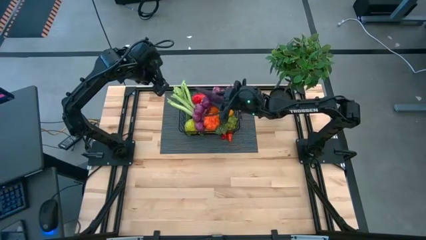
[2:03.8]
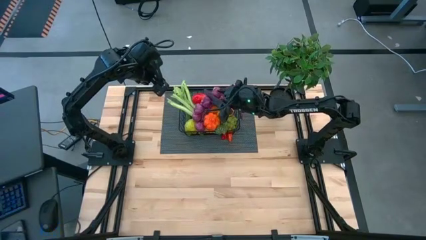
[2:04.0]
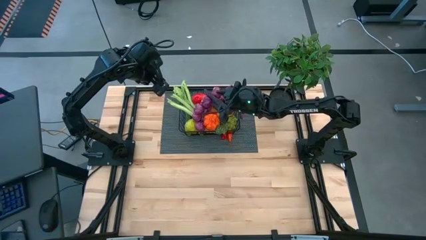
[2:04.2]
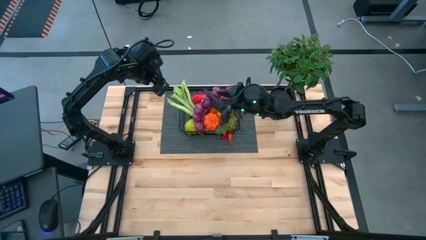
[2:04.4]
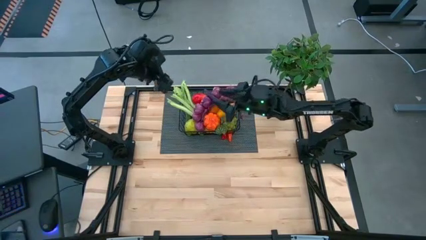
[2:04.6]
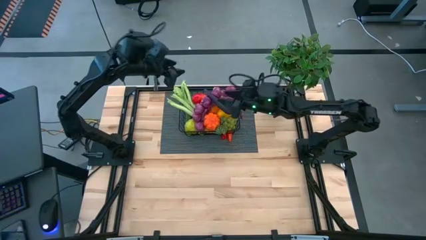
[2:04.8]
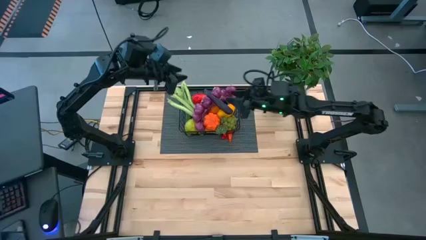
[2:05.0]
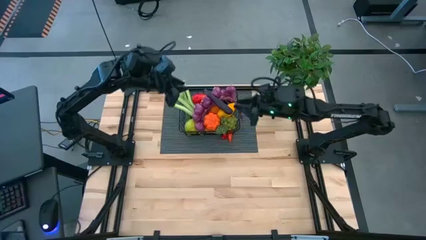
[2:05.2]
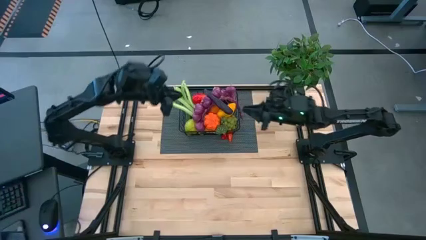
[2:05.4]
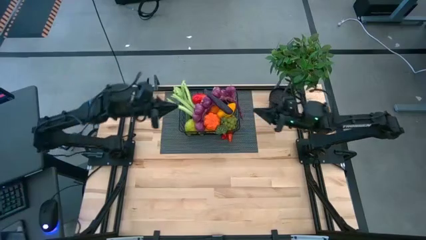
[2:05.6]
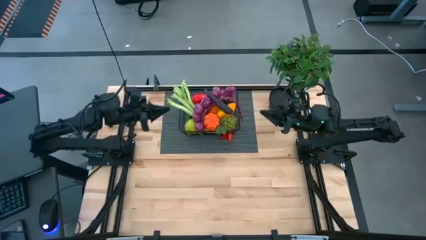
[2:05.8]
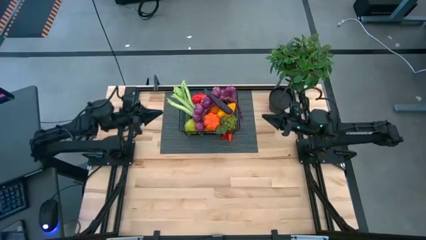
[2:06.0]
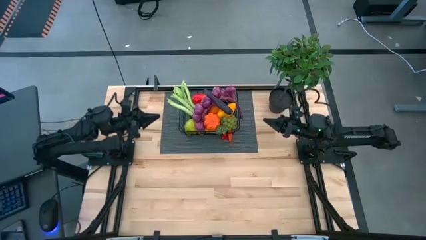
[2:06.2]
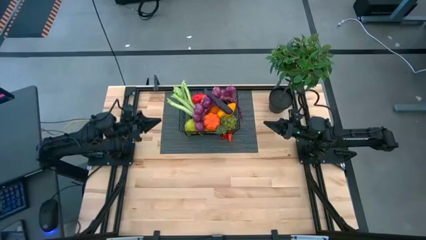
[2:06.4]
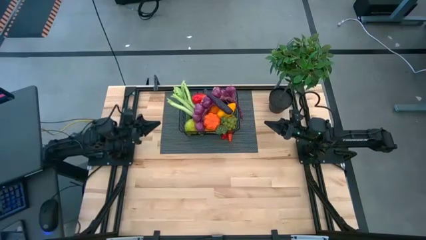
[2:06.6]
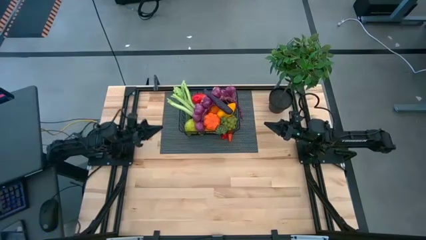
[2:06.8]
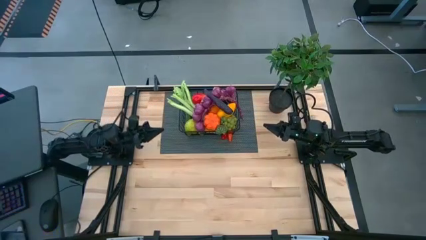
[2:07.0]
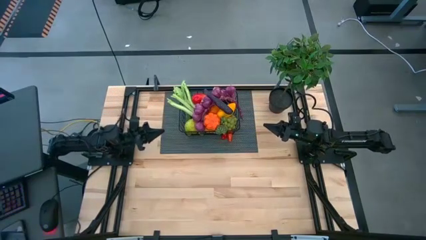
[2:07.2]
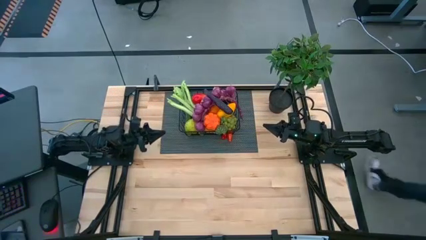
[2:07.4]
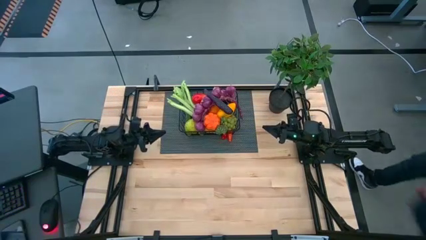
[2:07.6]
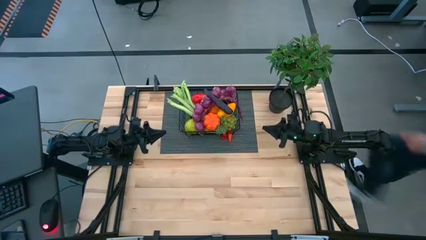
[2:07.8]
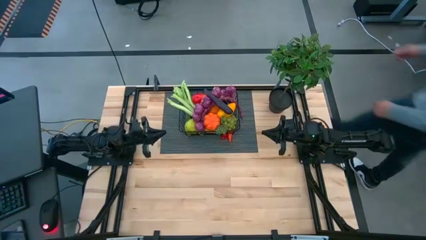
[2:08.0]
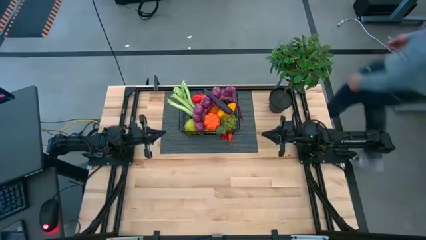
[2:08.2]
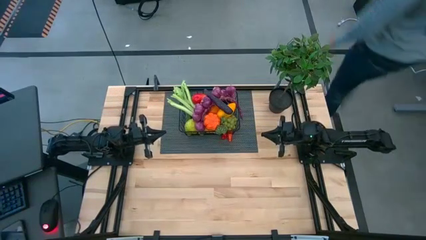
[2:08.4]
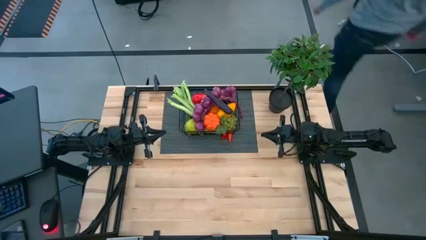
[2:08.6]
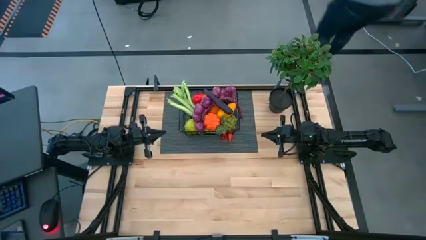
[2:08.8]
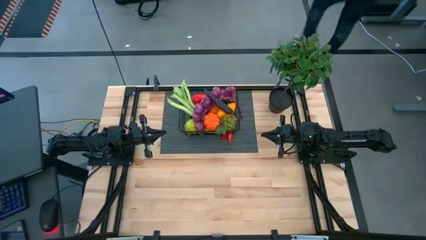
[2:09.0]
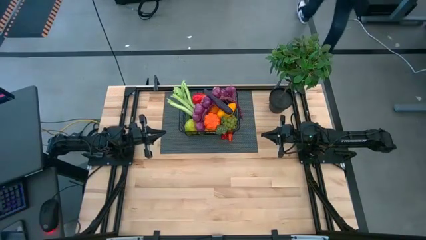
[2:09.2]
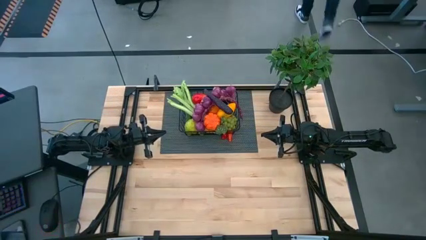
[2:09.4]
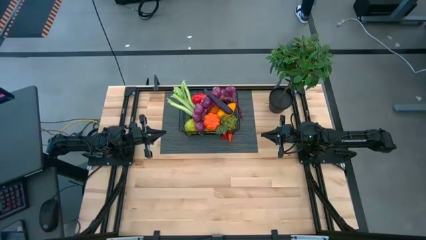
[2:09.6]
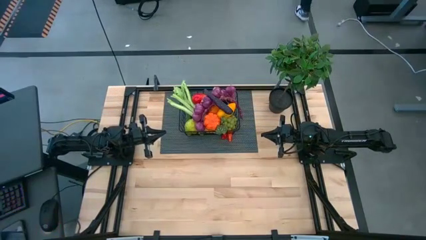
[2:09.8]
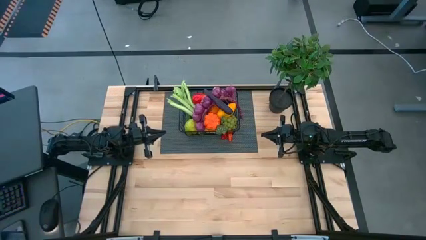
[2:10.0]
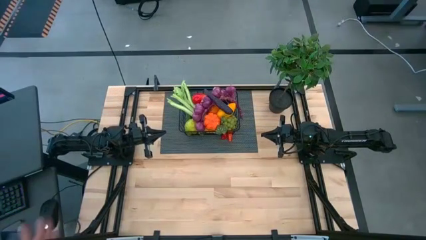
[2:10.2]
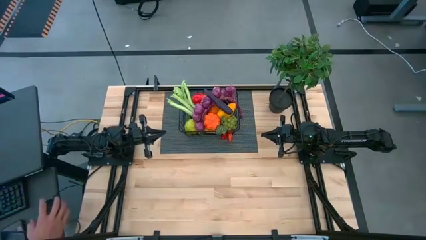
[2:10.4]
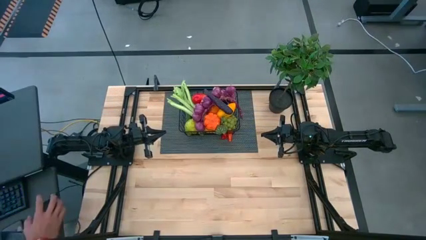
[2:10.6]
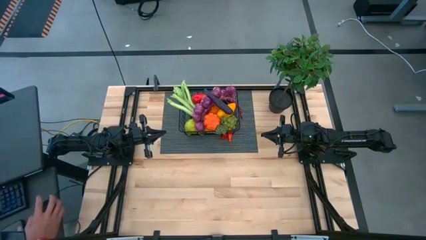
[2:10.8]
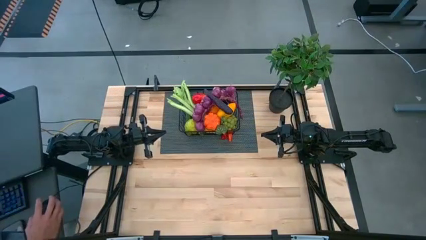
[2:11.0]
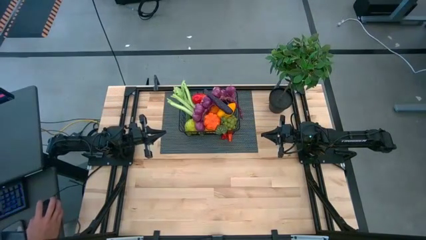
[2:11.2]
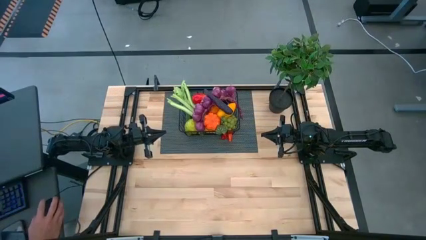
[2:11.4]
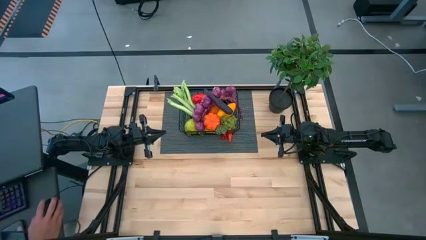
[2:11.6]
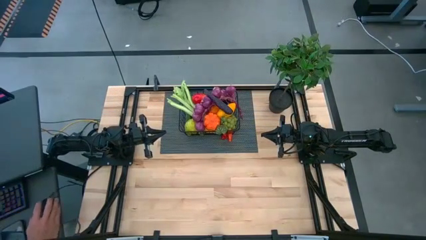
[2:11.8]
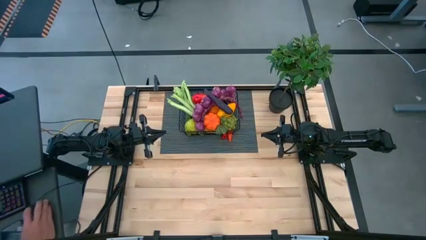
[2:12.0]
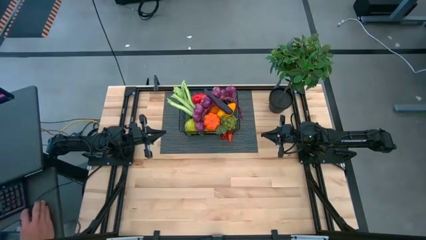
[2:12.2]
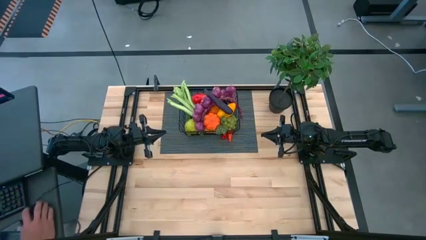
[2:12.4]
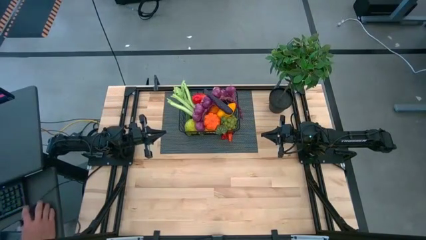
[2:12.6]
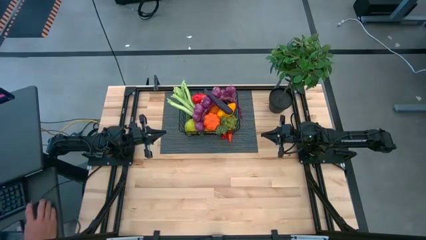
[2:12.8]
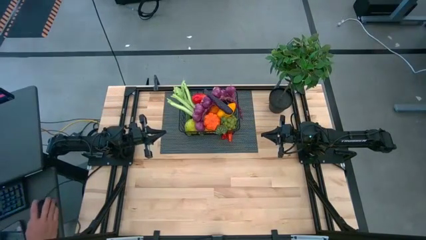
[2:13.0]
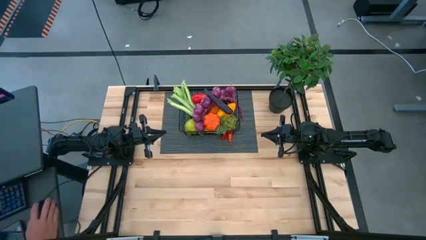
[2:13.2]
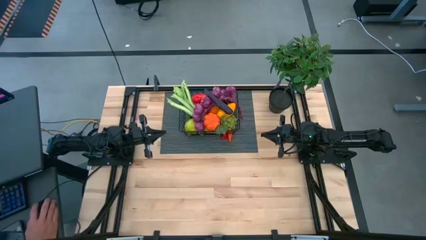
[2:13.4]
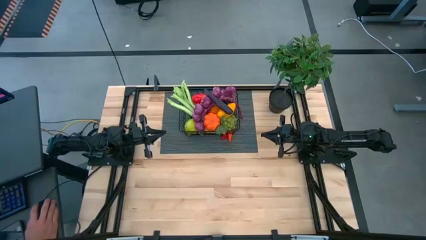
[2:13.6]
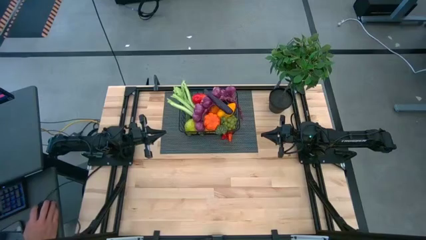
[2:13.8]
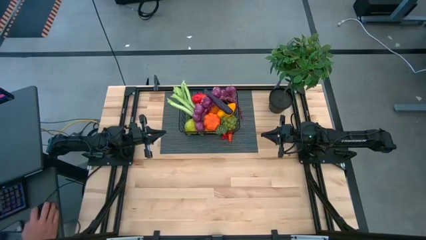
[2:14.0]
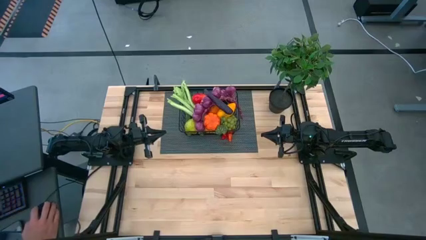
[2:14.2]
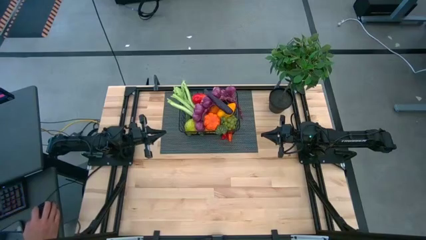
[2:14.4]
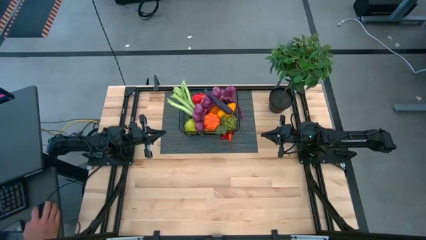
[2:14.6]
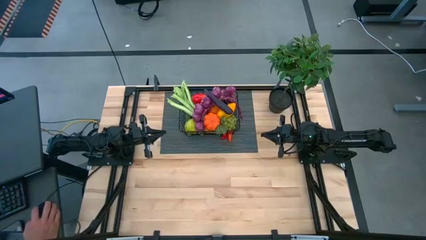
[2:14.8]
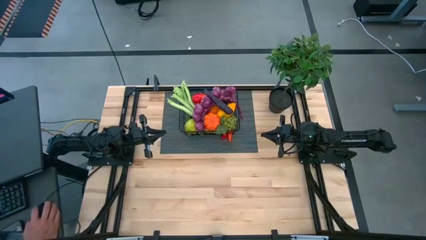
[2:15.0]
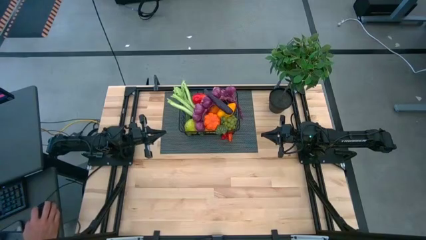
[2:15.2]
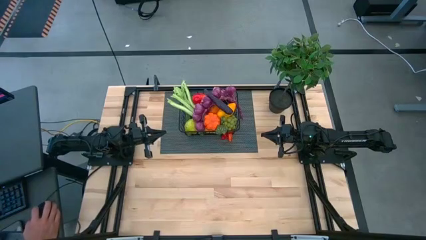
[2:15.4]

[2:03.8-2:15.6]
Task: Build produce basket
Return to Home Position

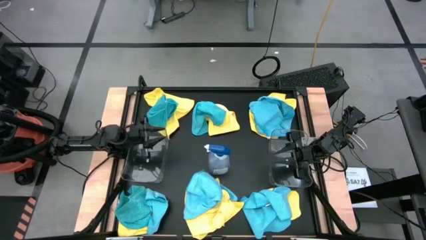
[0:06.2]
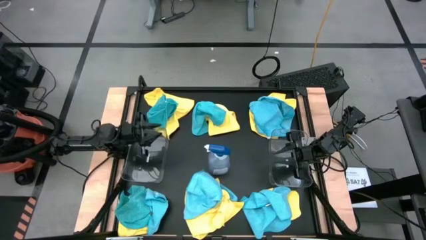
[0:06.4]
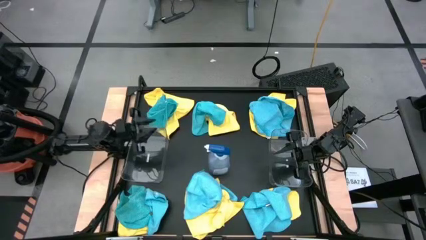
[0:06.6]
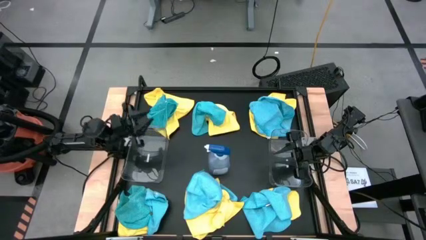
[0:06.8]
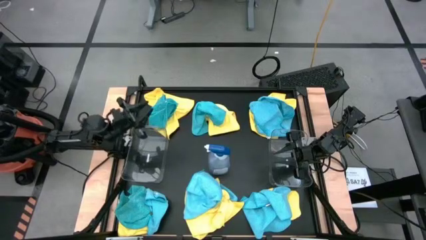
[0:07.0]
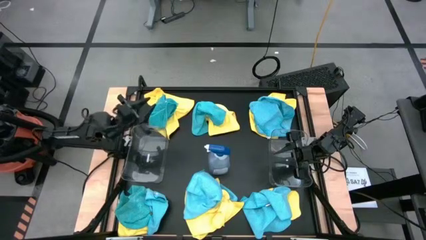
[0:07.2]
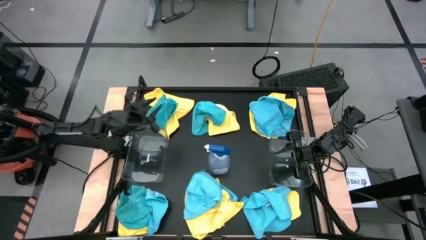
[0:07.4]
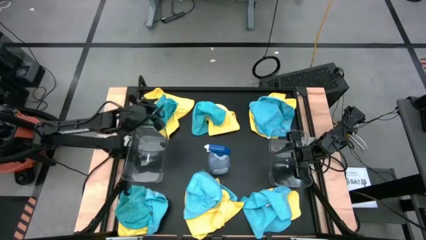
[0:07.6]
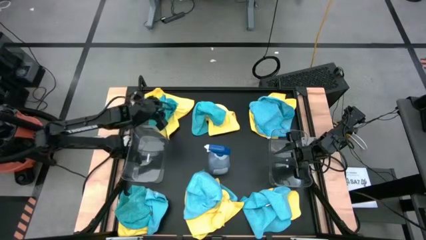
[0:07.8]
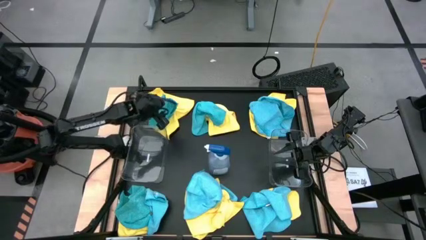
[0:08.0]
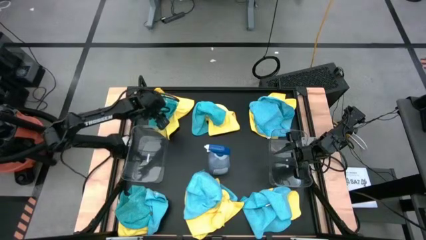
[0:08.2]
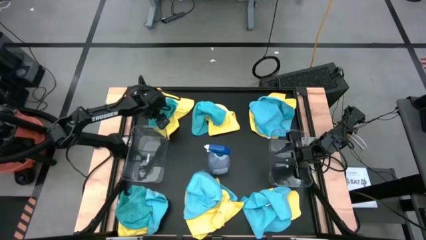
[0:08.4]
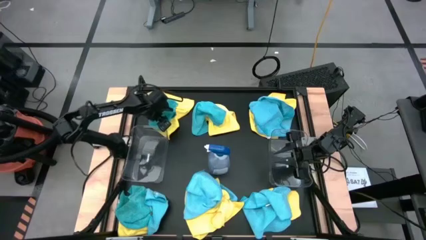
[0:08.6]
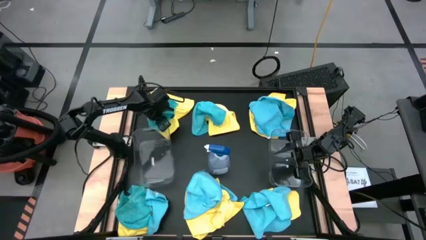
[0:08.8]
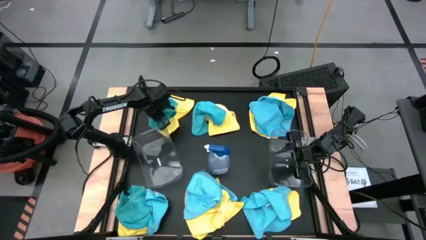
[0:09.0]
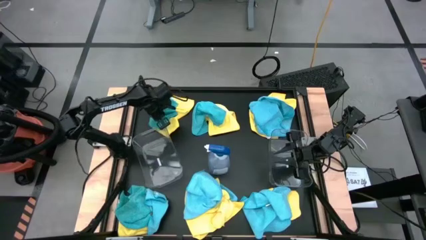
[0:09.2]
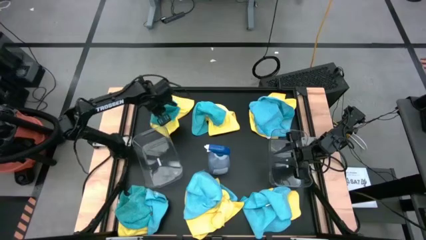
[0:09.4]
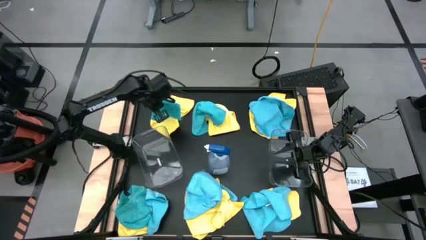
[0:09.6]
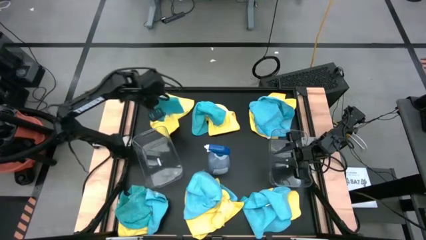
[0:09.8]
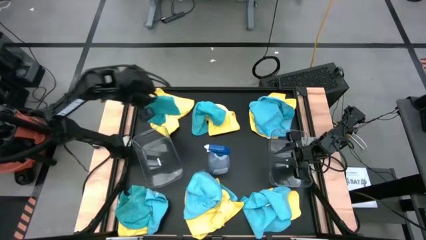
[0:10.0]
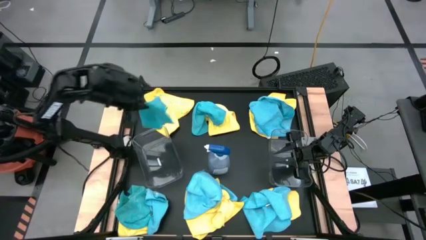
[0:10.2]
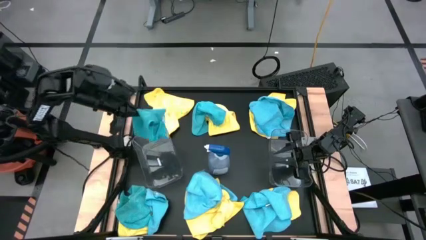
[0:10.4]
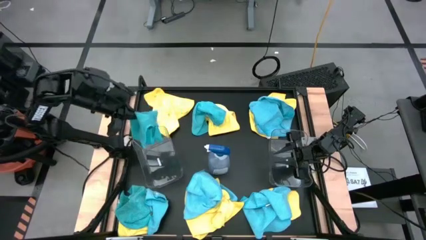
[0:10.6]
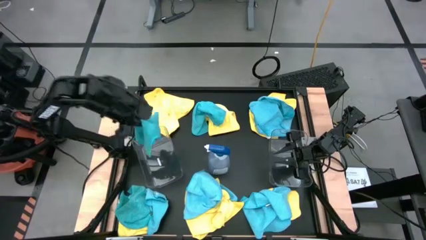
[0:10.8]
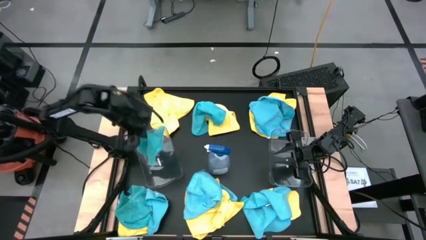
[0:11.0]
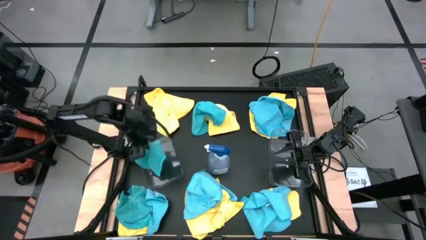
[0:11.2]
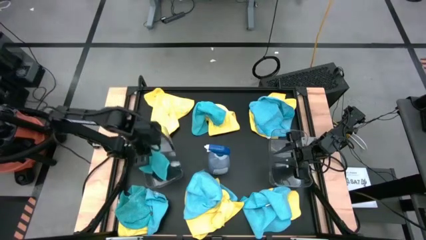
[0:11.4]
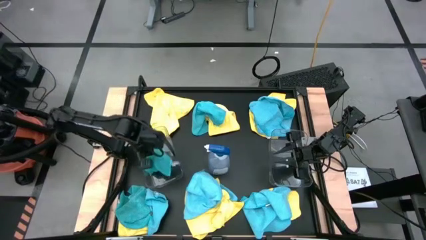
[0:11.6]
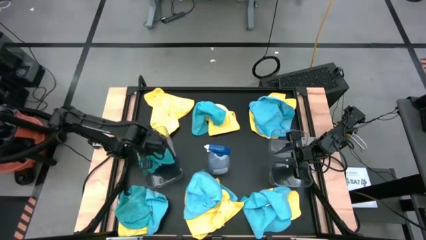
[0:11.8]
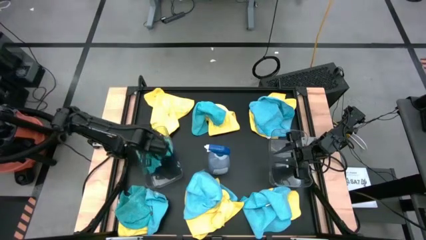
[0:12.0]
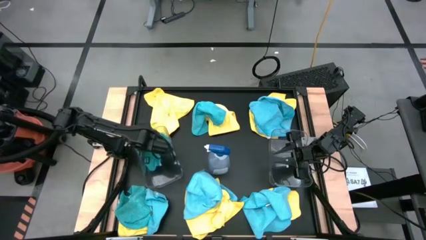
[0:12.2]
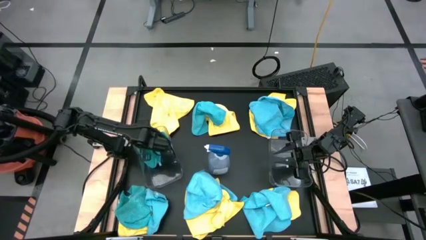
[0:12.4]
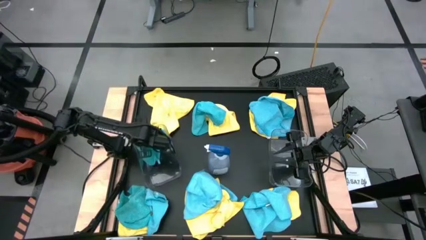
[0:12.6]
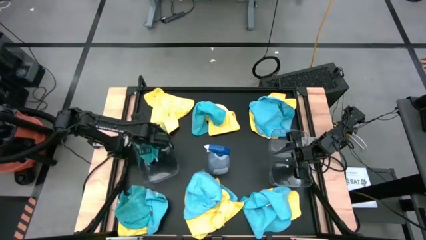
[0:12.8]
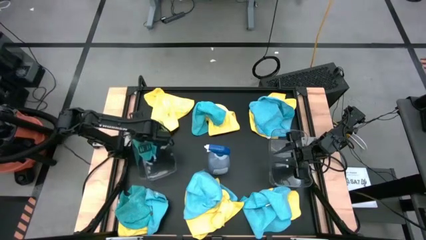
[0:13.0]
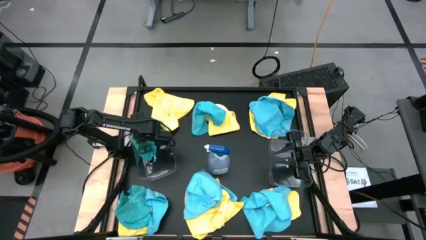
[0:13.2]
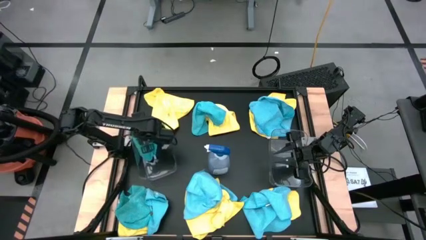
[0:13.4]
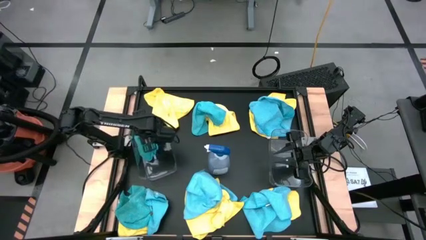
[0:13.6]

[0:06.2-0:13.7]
Task: Sort microfiber towel by color & place in baskets
Put the blue microfiber cloth into the left transparent bin
